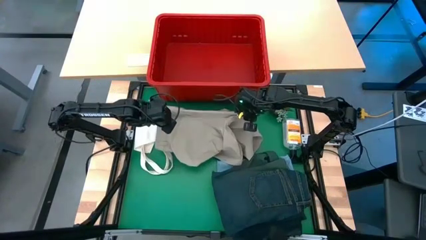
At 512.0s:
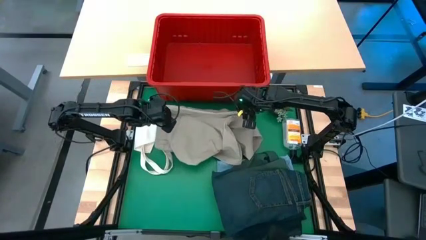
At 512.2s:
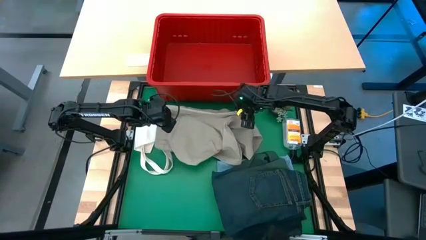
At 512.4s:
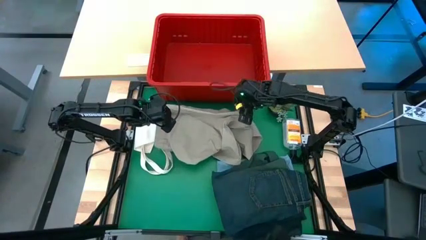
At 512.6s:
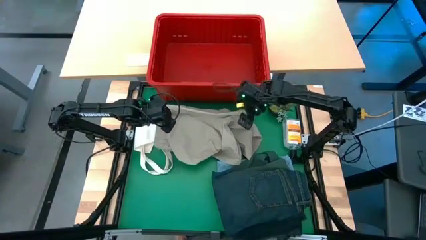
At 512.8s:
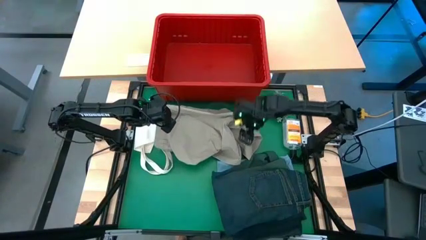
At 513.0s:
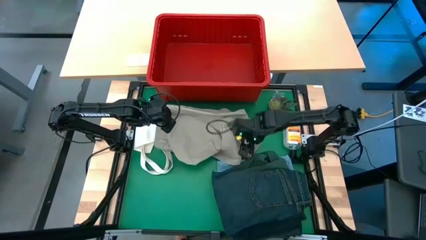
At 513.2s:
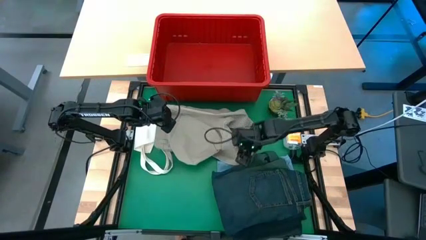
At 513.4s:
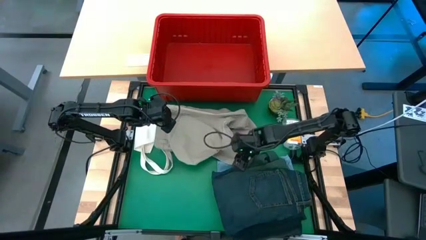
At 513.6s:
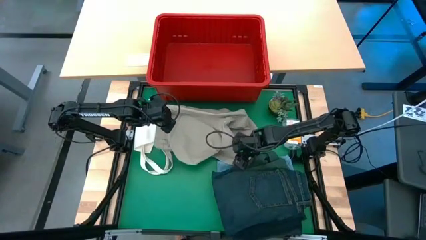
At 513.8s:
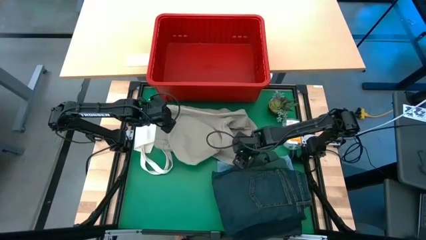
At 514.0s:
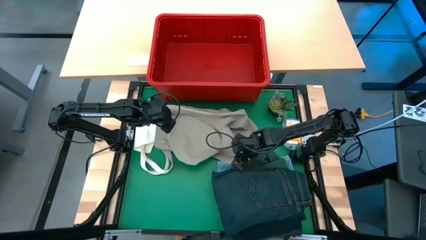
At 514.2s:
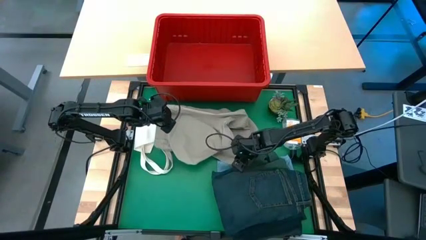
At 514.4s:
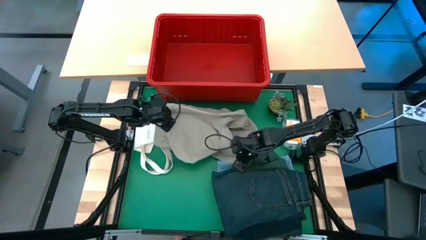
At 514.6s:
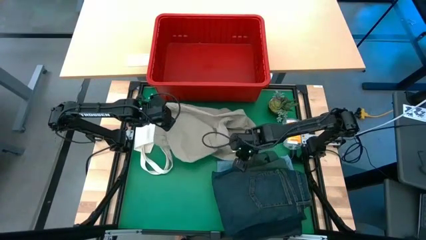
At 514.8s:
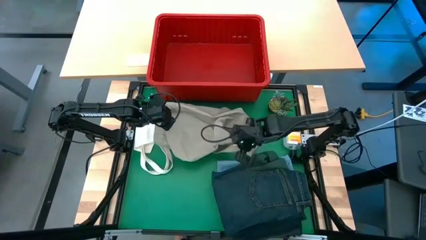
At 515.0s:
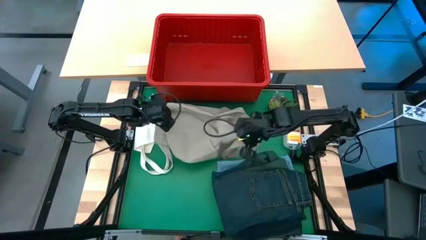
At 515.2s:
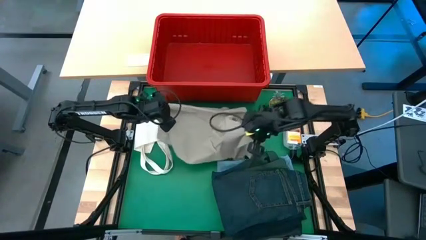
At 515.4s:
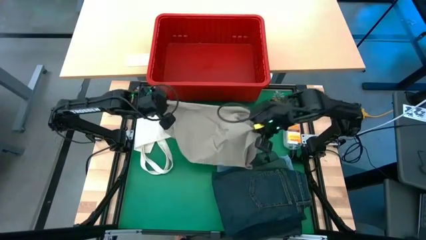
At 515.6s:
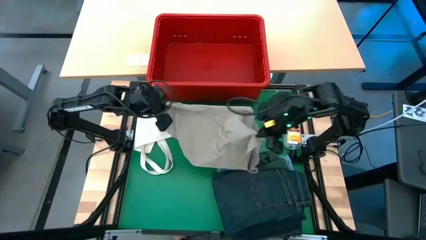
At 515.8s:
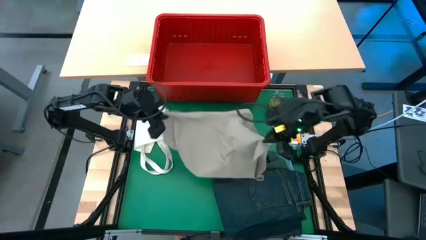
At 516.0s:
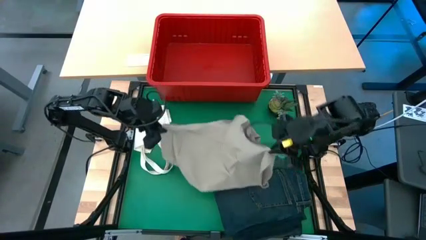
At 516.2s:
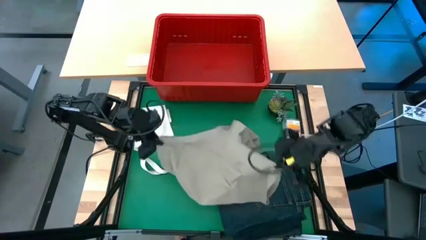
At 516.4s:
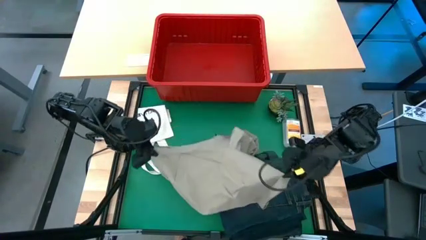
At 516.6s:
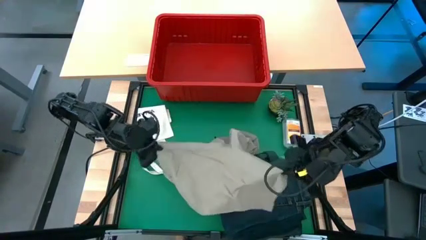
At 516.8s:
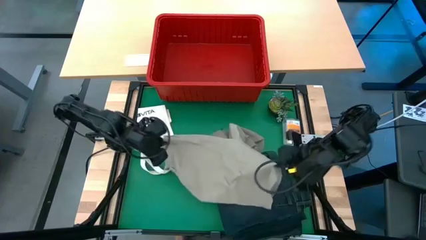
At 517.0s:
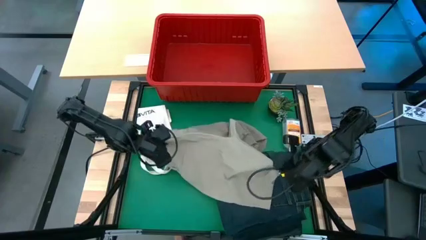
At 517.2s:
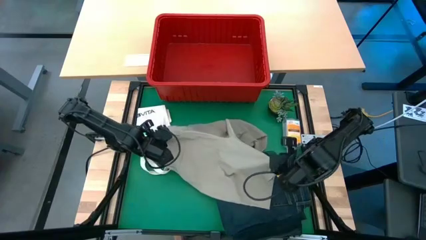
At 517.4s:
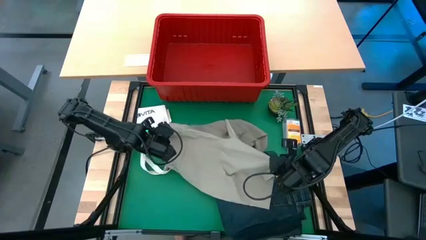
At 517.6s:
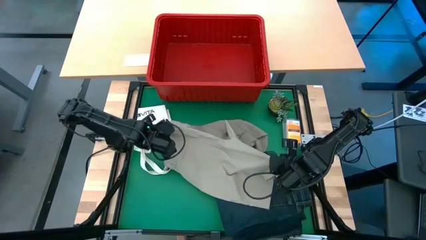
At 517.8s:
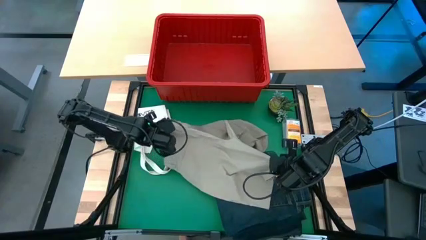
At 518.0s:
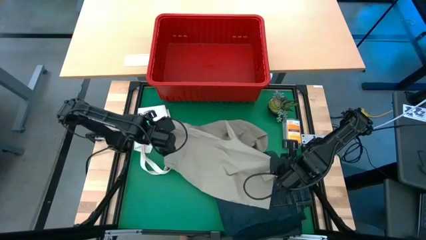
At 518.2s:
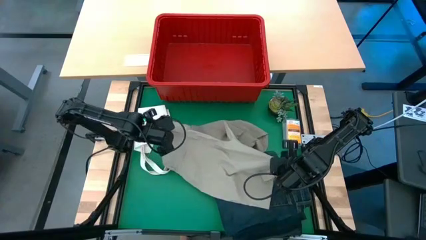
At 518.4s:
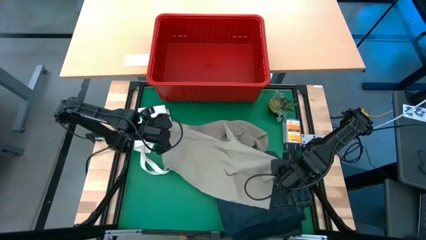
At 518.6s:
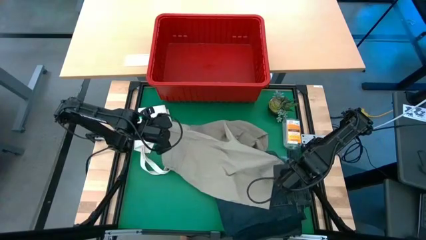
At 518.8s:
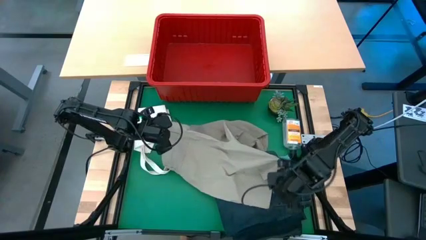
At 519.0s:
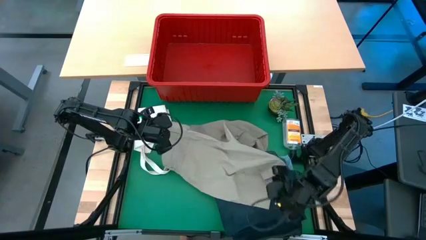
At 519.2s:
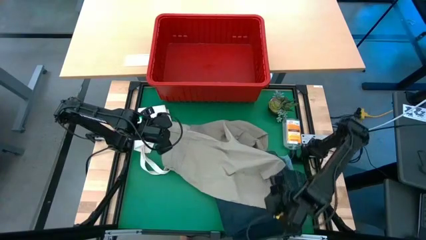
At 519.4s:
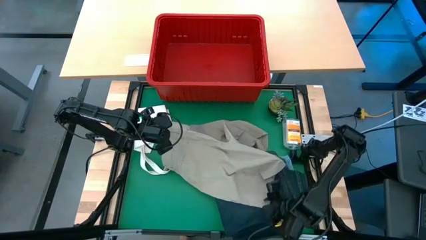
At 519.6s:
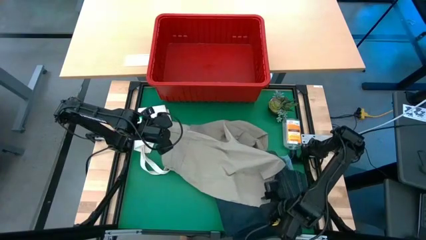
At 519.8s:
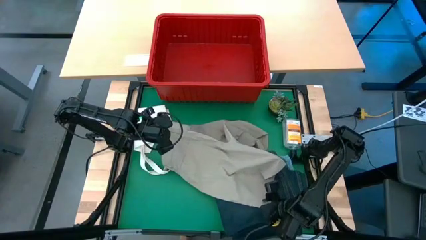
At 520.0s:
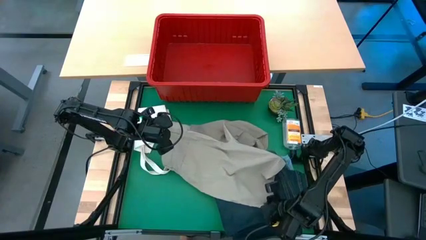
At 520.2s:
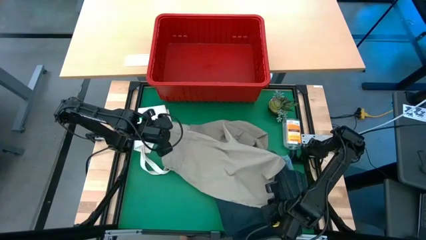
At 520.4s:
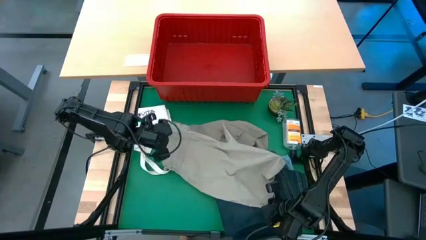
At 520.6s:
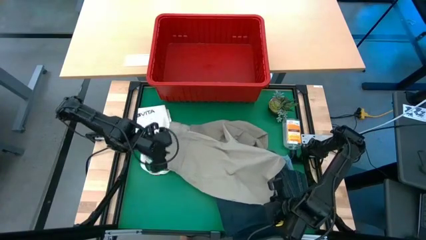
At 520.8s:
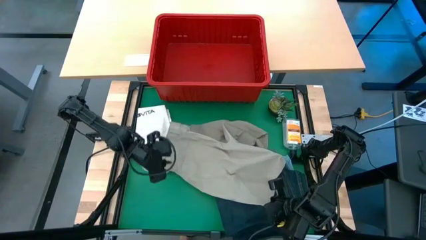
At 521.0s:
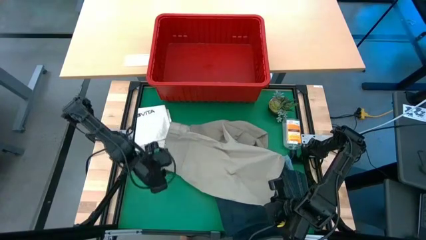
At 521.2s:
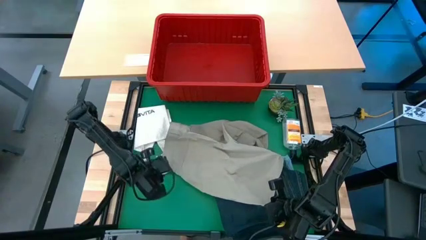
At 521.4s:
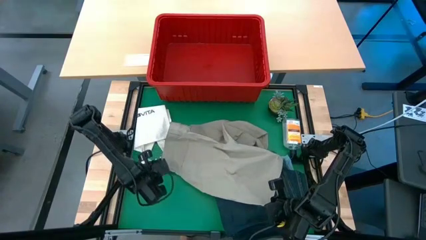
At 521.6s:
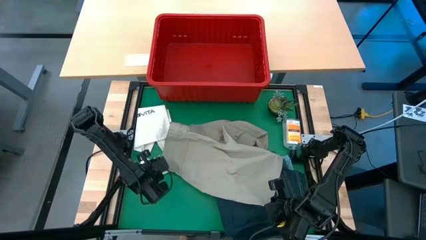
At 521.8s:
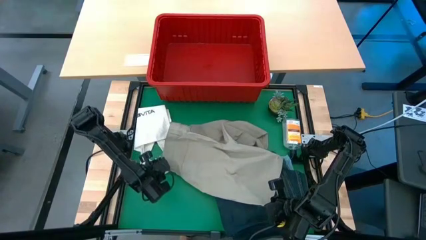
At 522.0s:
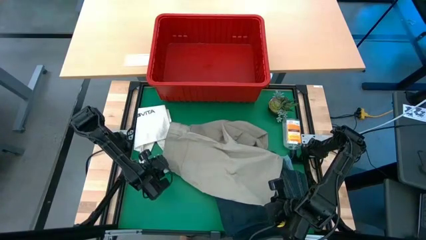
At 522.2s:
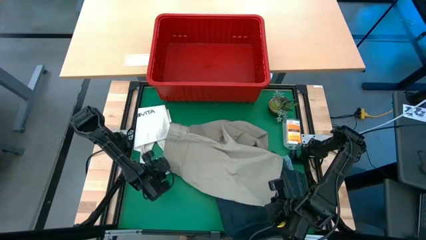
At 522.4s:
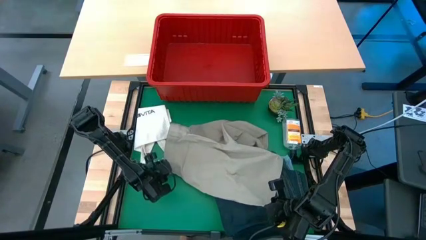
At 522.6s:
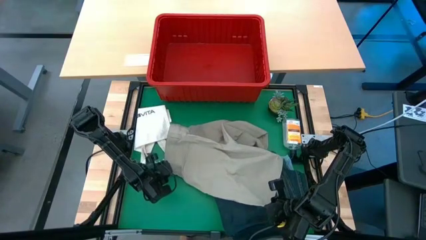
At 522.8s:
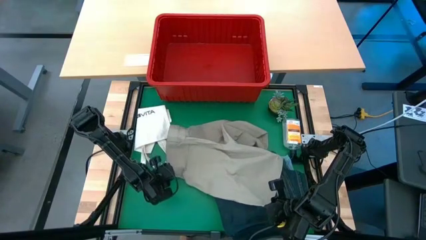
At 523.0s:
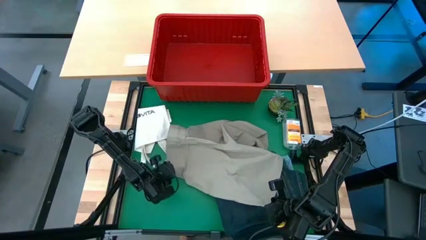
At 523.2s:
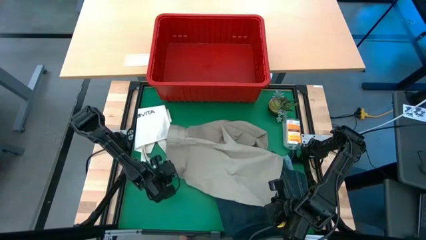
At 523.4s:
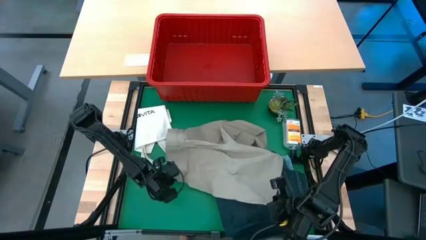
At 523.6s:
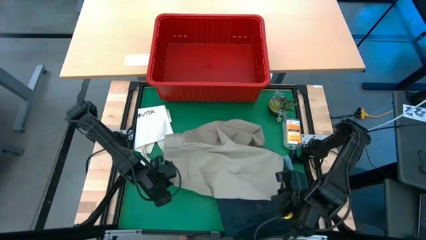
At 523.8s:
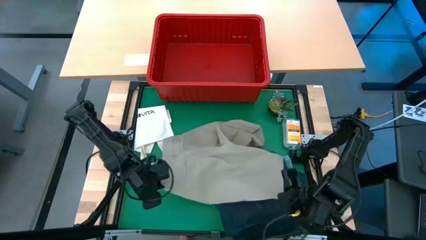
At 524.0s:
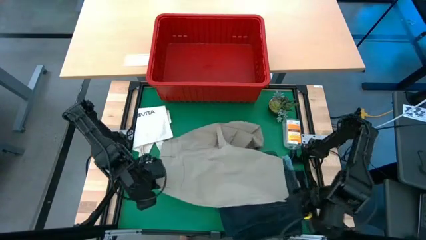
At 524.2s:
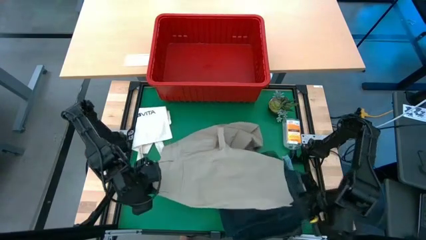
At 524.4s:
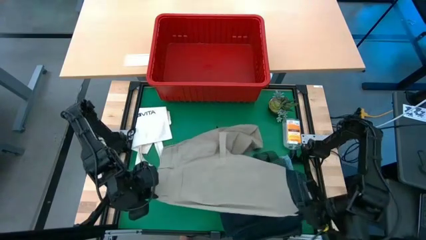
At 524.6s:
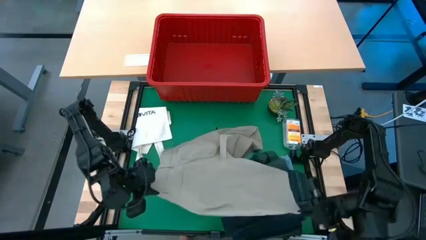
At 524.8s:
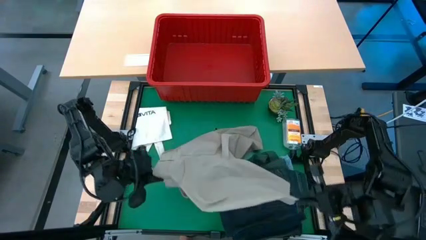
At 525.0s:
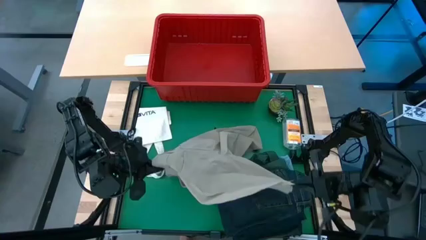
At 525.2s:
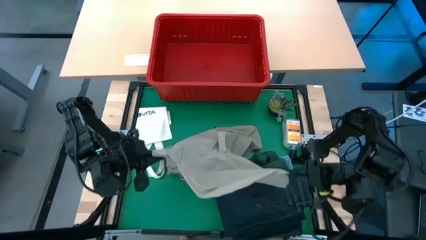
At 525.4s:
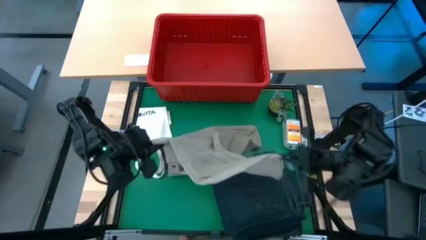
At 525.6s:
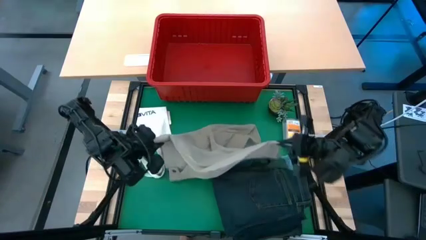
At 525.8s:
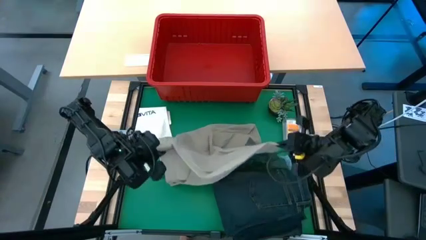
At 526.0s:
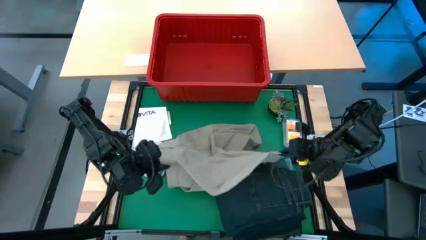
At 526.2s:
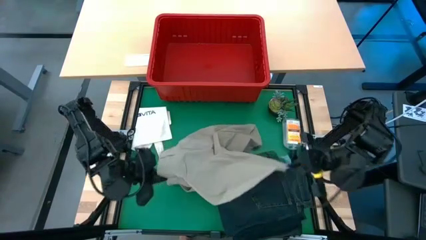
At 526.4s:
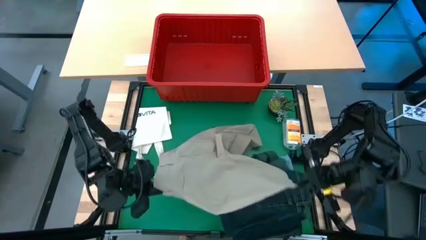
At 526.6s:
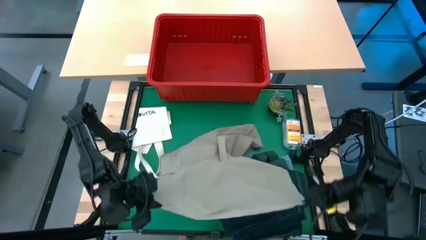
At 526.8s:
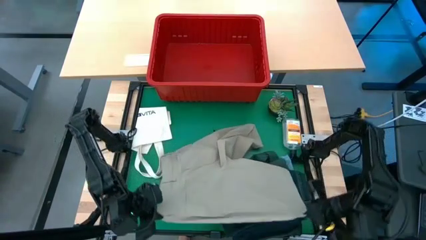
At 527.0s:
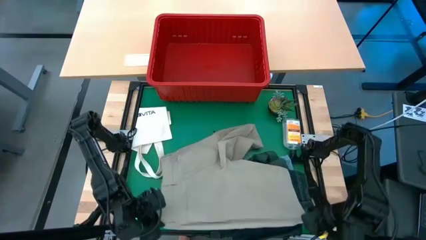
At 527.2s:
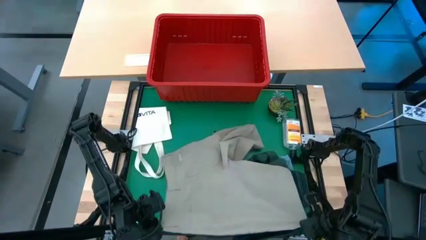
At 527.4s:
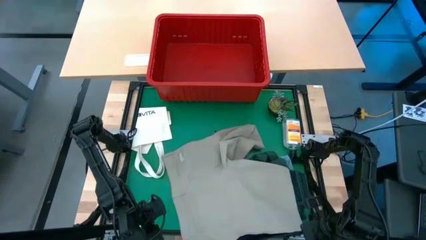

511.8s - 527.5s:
Task: Fold Laundry from Bin
Fold the brown shorts

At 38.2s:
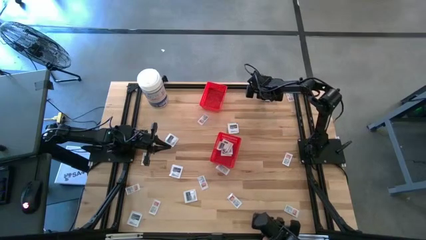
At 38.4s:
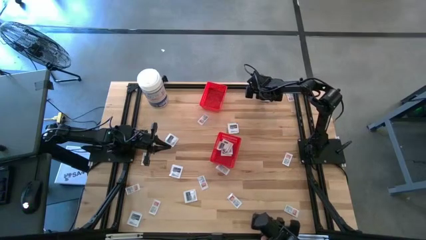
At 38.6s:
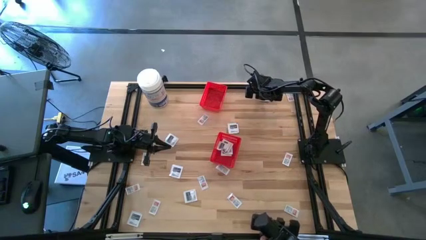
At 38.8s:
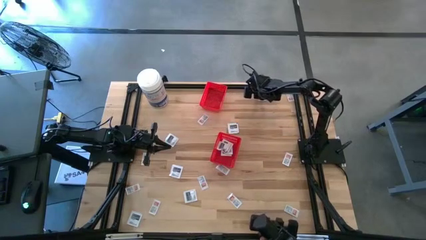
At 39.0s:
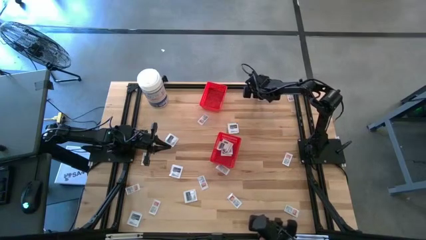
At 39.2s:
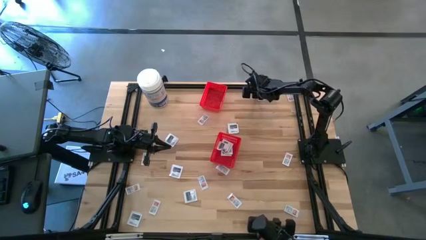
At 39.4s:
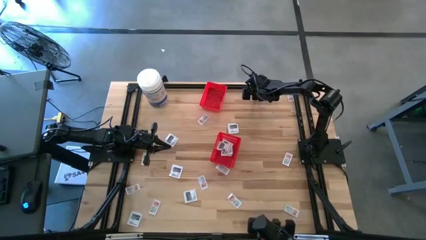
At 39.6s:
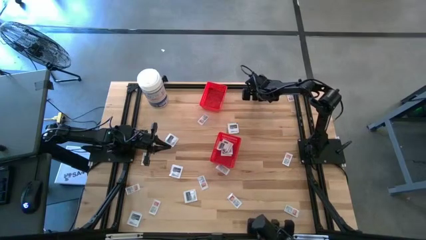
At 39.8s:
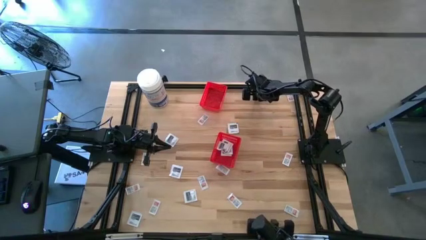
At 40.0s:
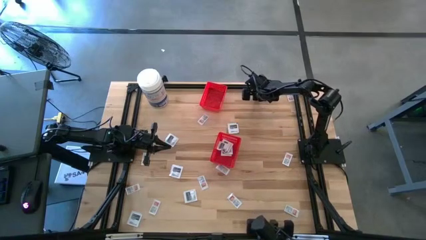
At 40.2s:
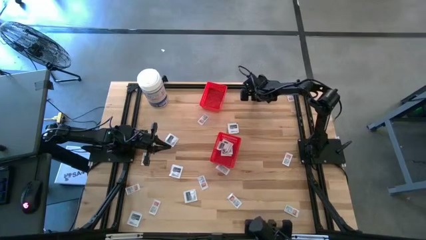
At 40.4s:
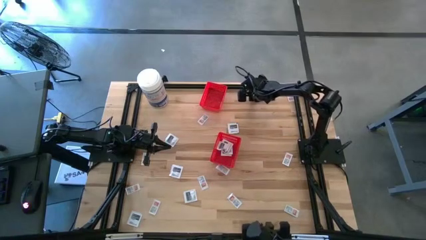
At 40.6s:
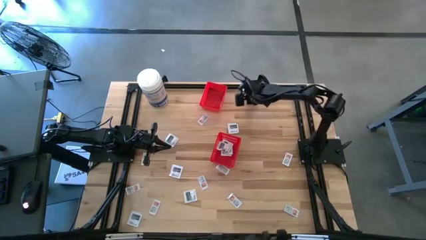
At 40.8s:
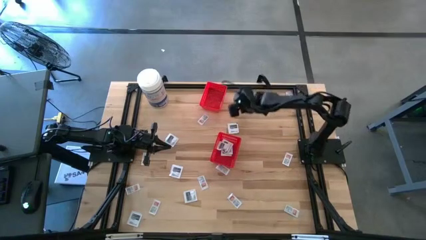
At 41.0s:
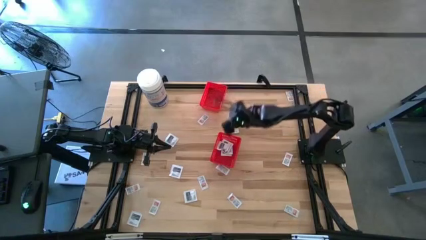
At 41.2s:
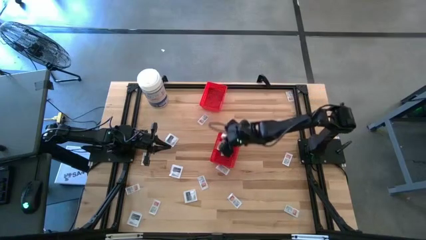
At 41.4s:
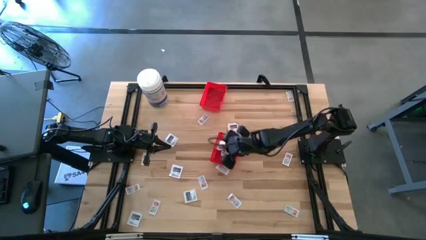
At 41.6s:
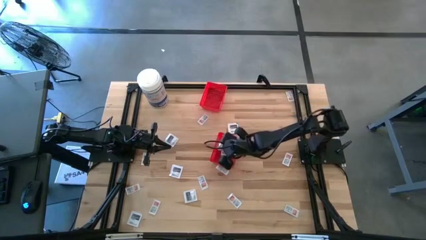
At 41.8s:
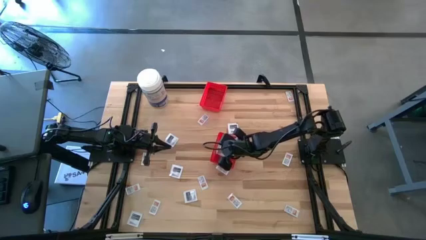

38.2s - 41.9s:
Task: Pick & Place First Aid Supplies
Put the white towelette pack into the bottom red bin
